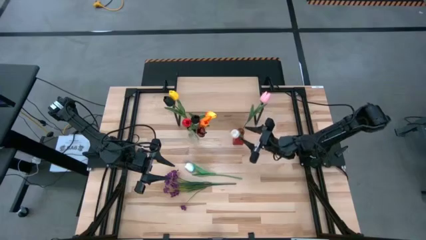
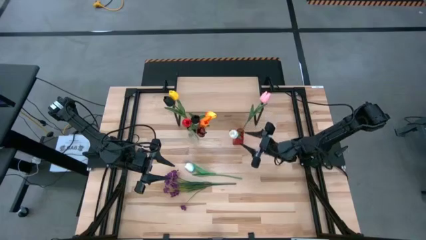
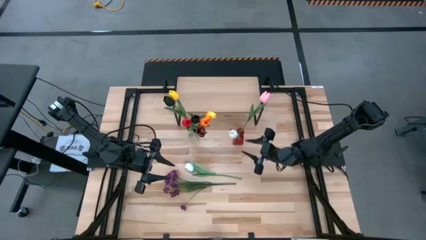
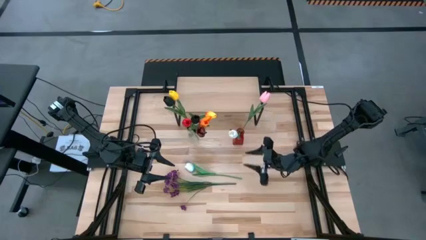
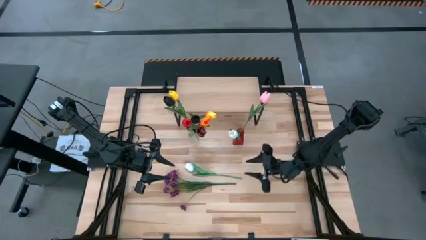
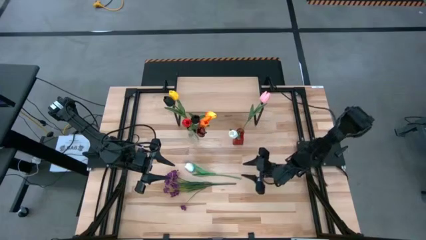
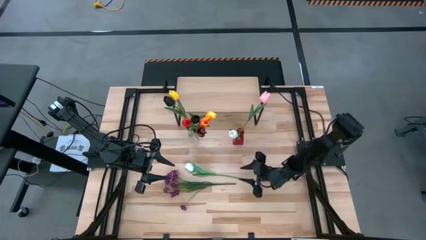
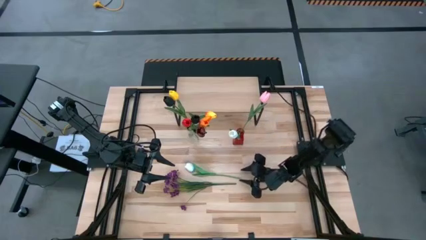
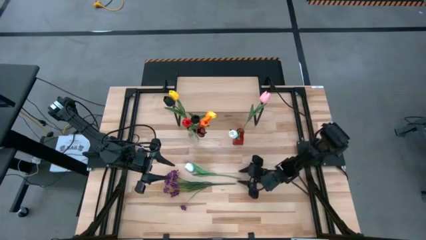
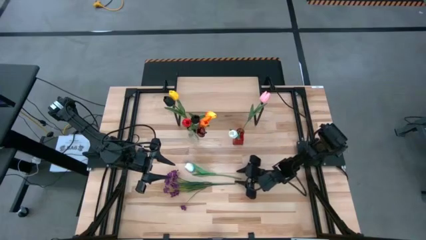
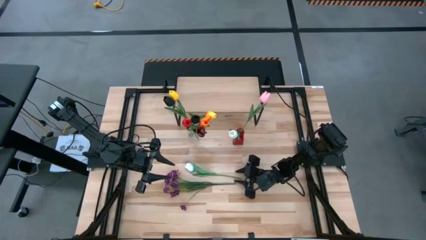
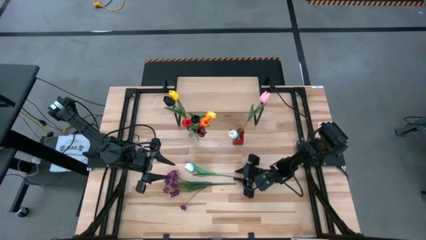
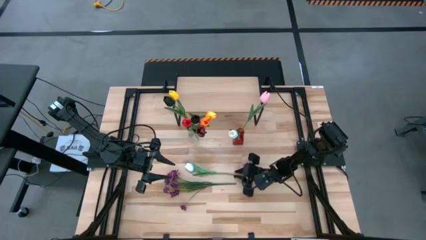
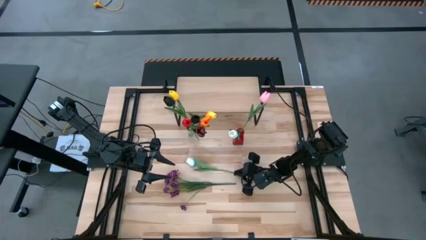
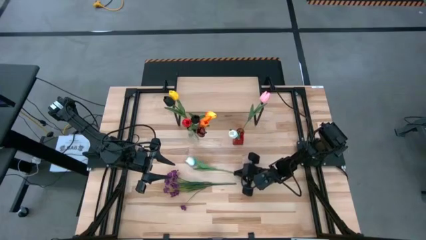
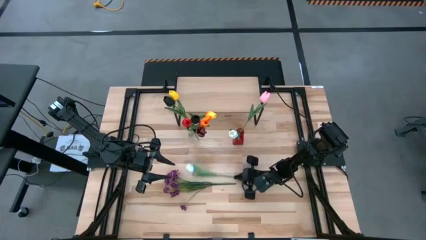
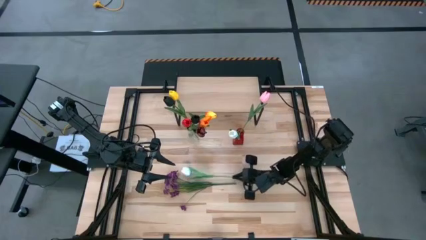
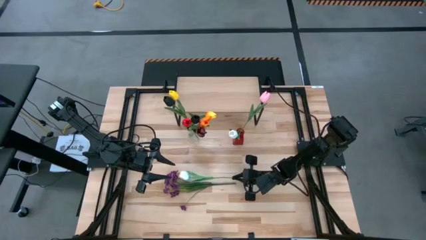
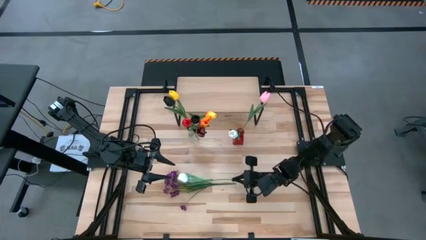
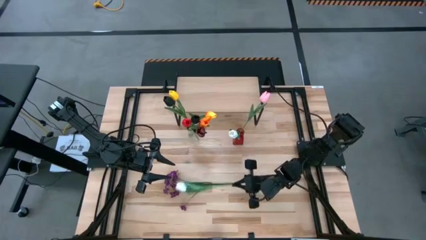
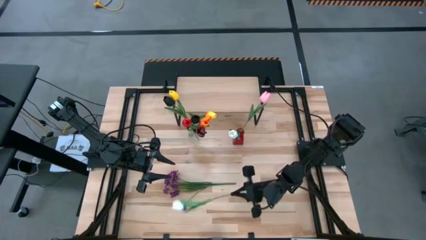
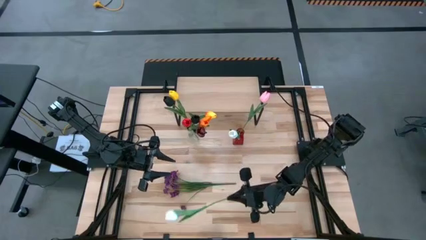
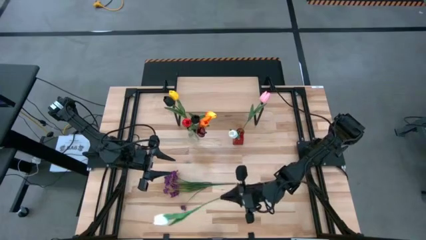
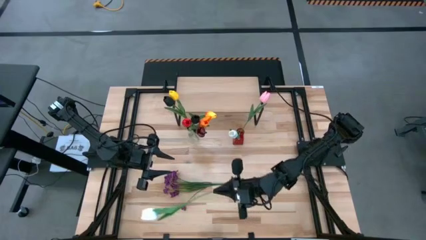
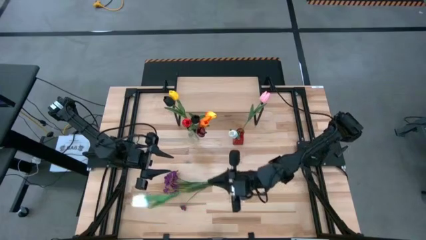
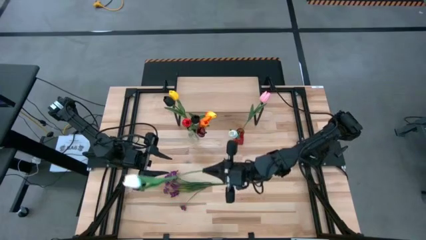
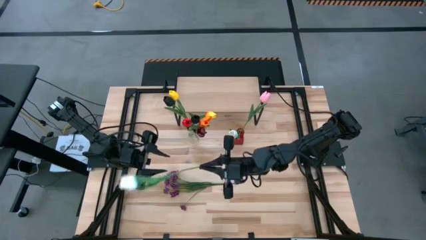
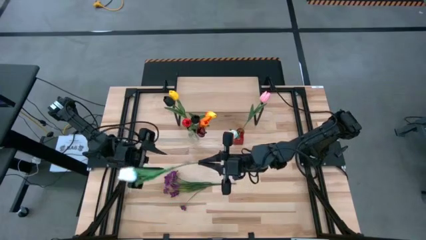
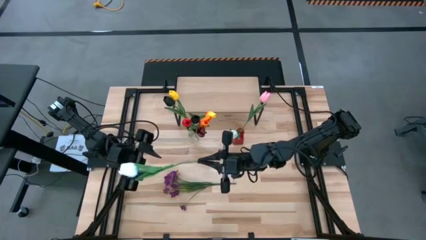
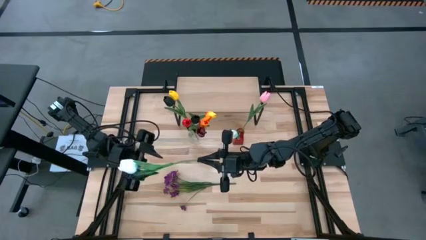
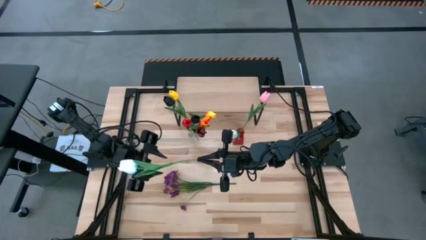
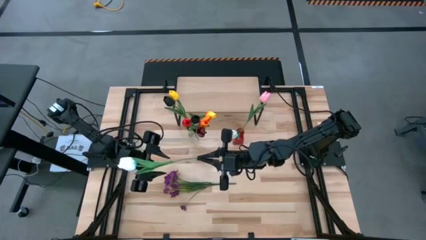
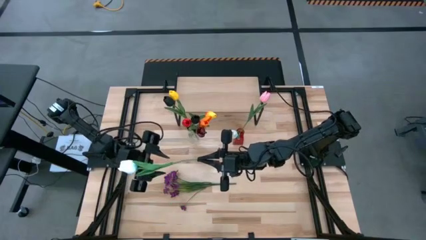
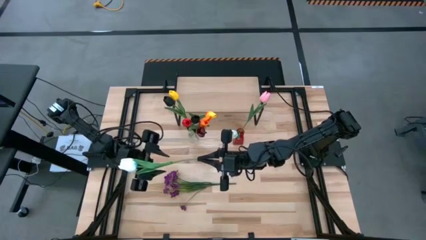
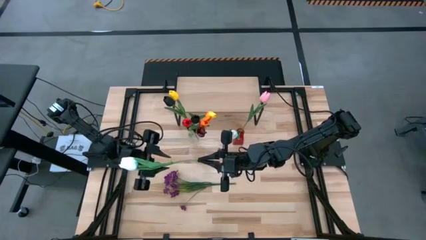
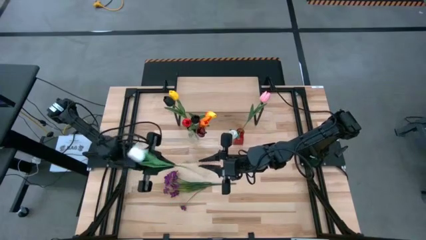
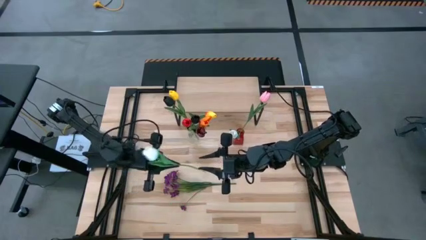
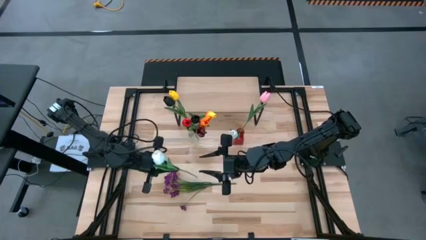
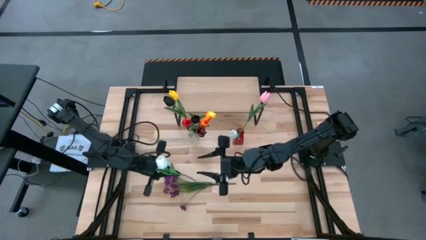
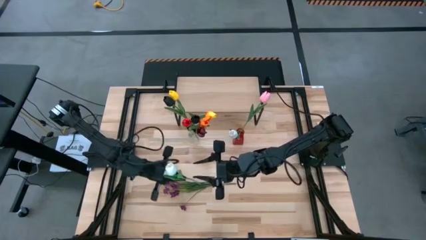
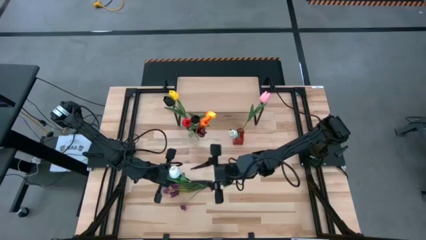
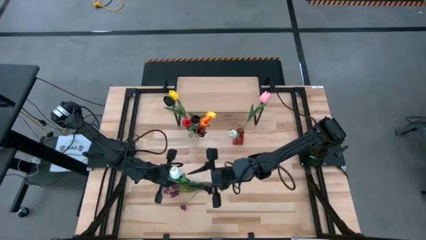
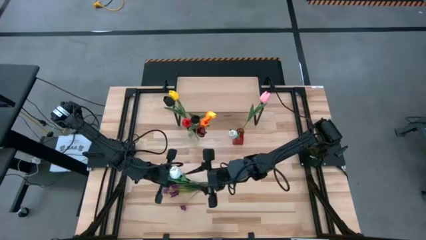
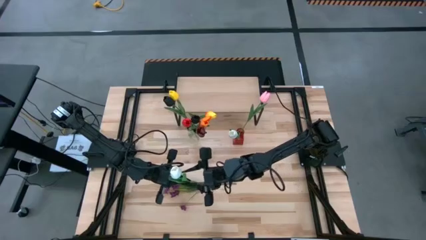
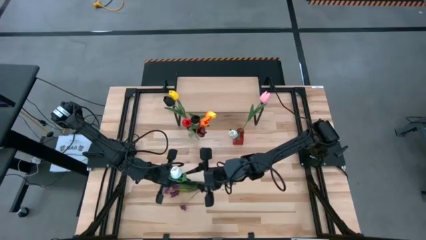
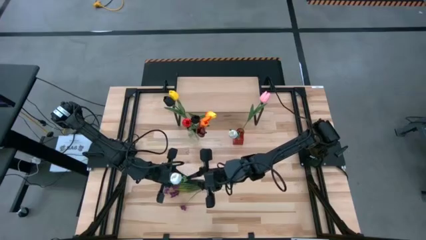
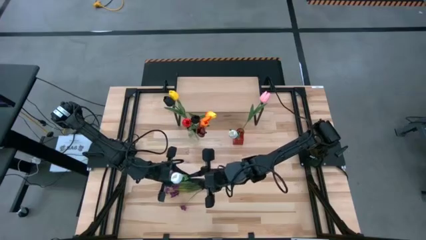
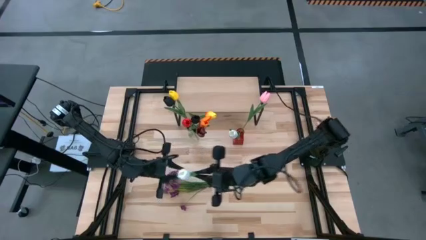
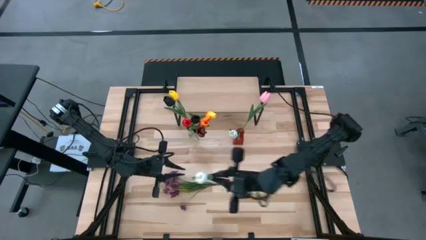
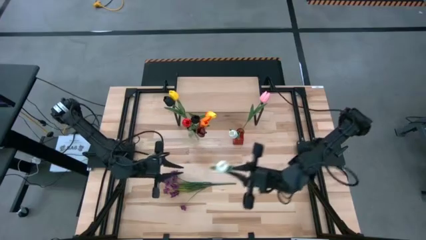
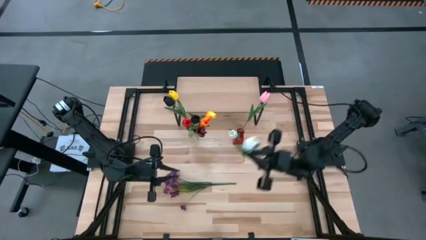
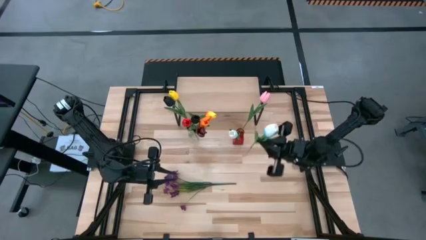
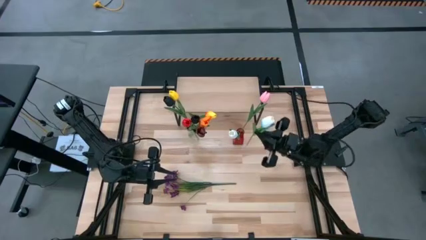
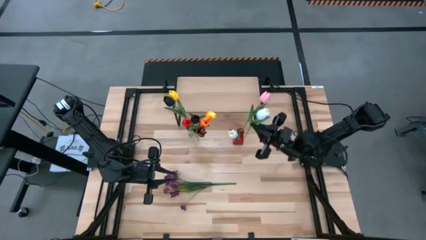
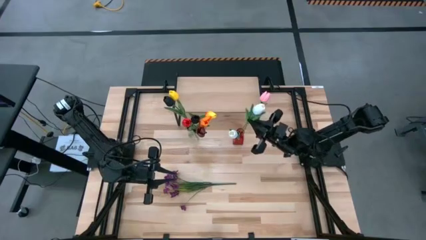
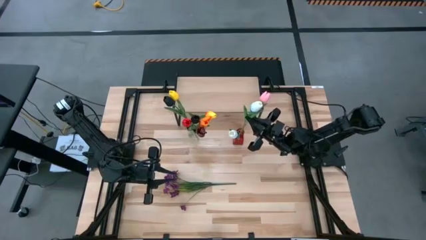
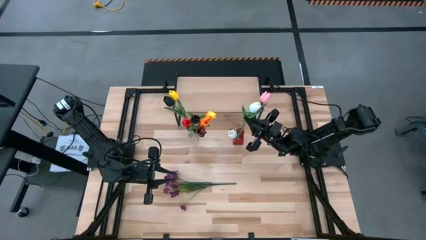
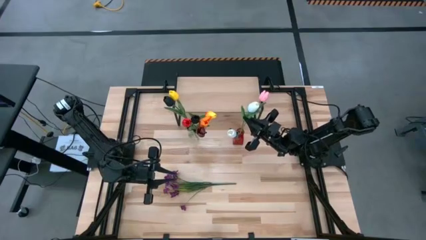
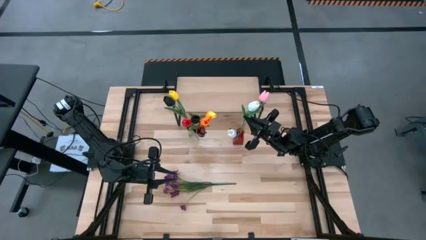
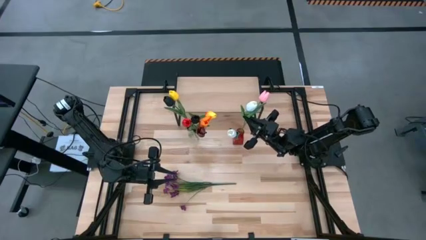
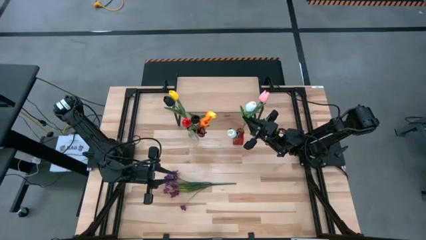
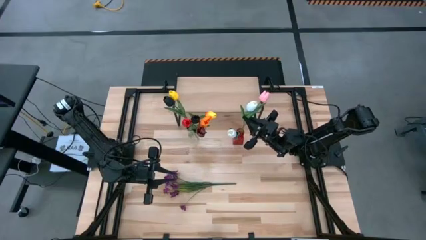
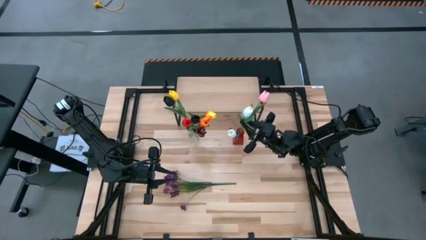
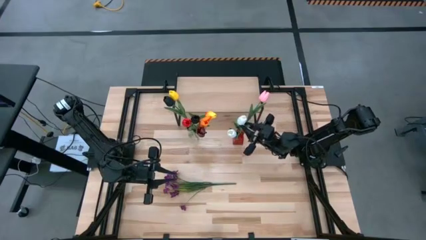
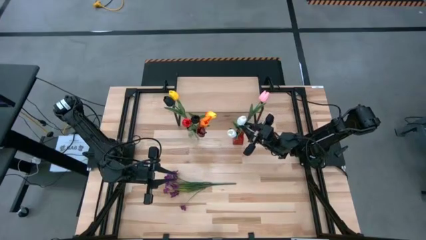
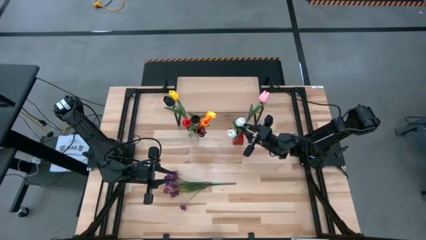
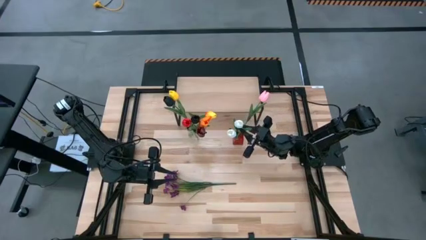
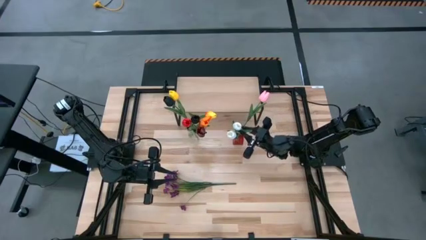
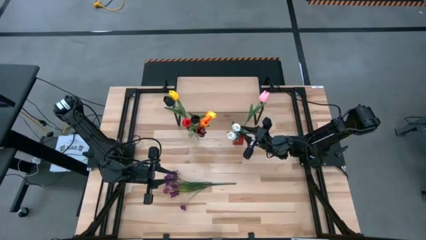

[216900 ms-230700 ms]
Task: Pick and place flowers into a vace then onto a shelf
Put the blue tulip into the red vase

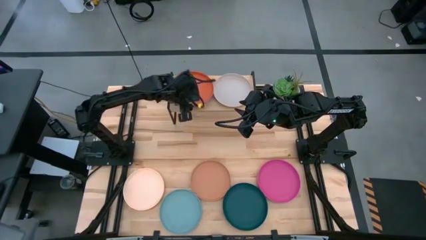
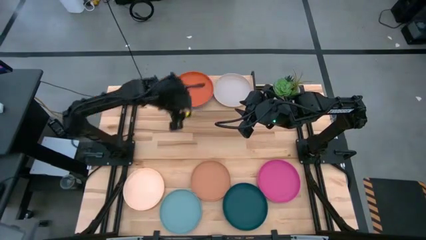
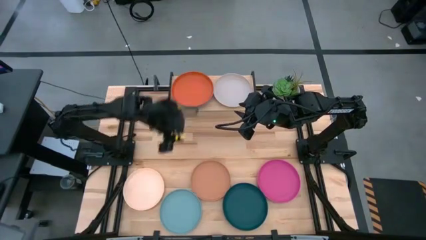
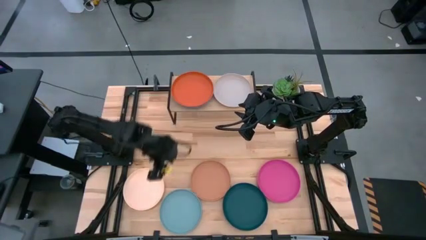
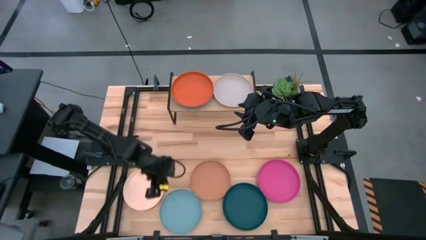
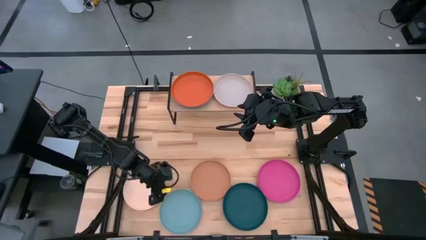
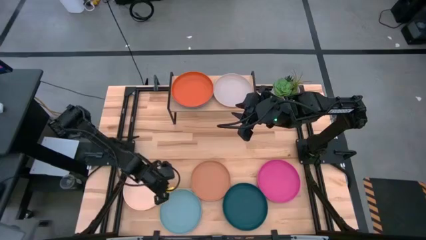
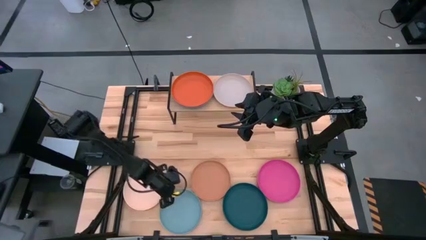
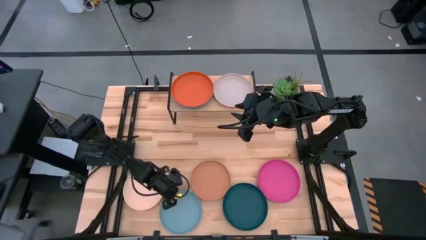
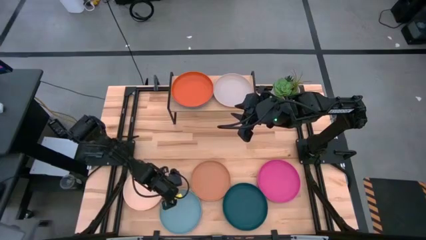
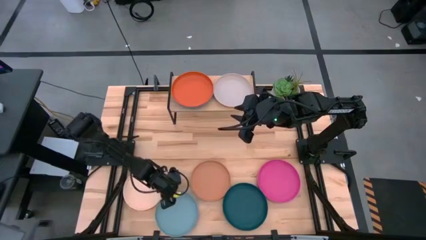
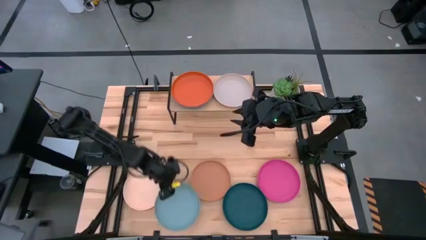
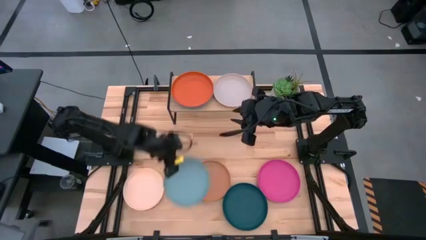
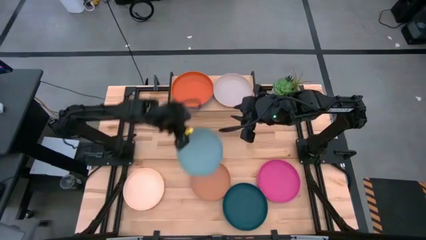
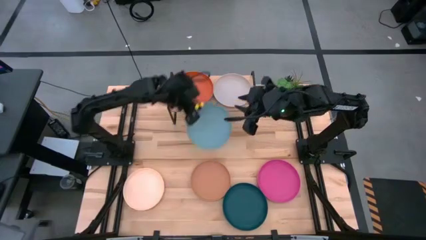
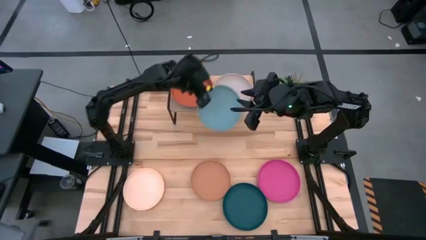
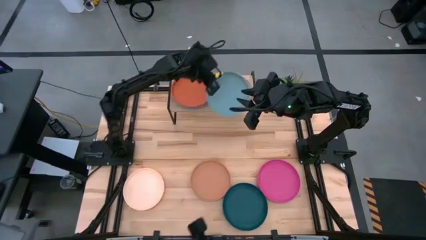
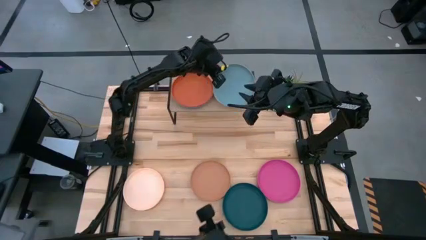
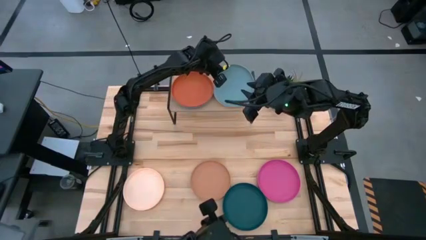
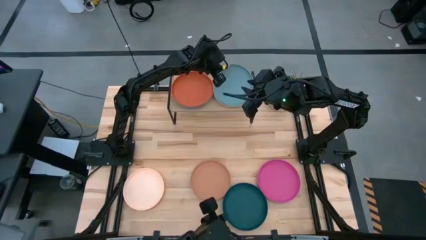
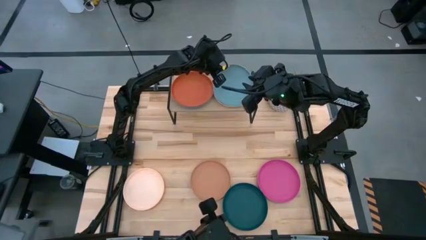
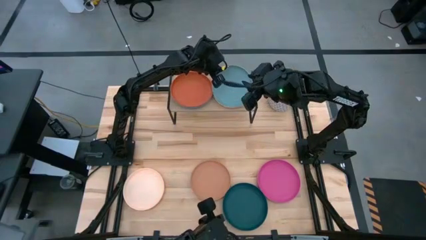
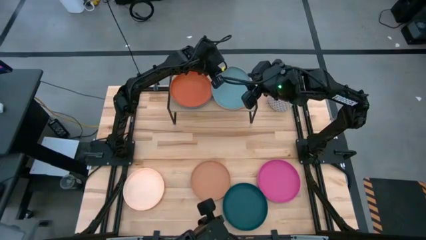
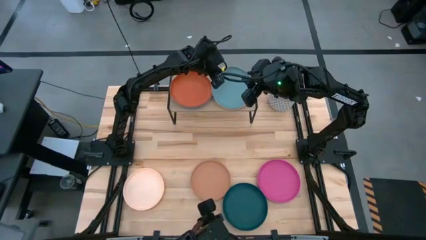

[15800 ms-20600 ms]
Task: Place and stack plates onto a shelf
Stack the cyan plate on top of the gray plate on the shelf
